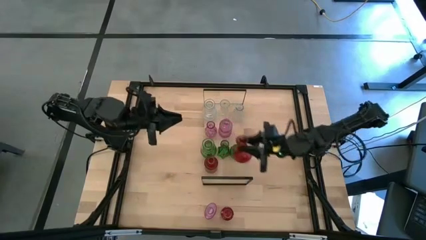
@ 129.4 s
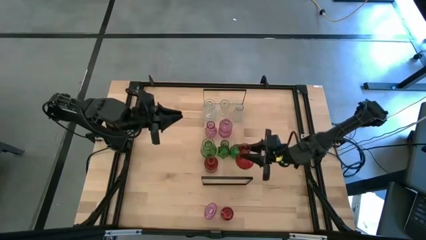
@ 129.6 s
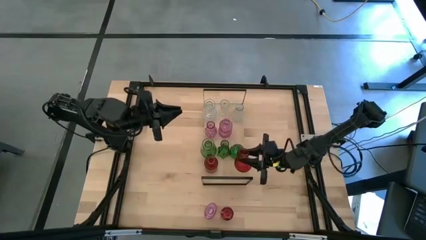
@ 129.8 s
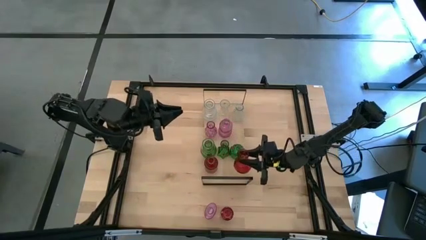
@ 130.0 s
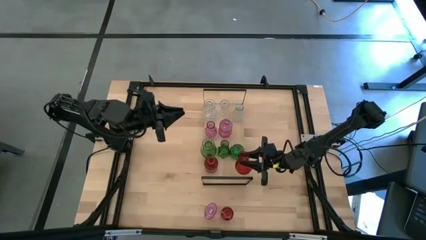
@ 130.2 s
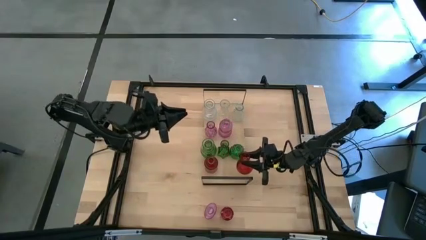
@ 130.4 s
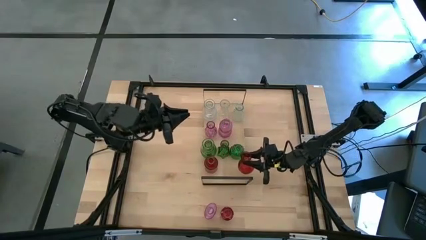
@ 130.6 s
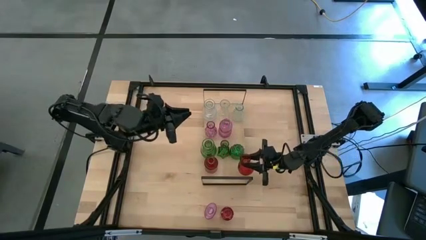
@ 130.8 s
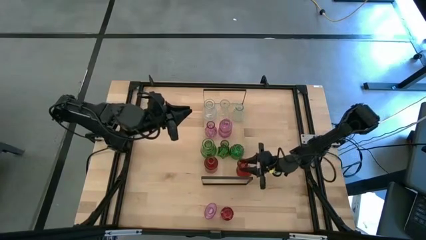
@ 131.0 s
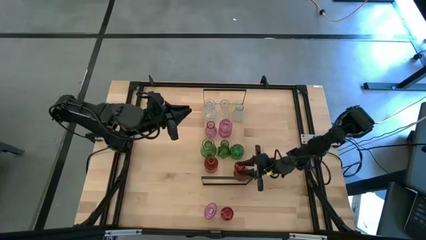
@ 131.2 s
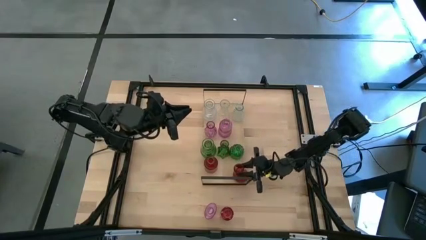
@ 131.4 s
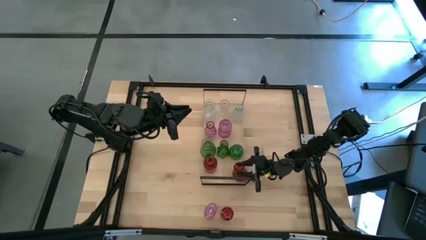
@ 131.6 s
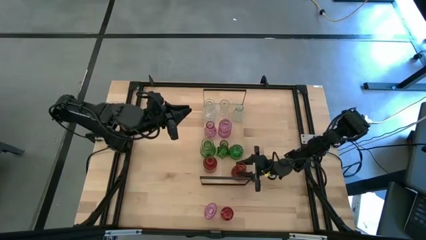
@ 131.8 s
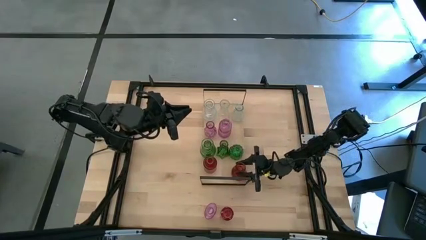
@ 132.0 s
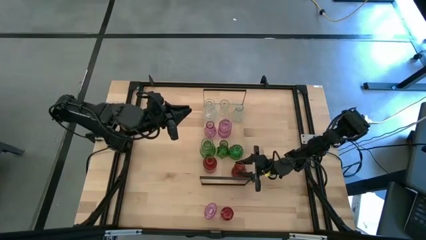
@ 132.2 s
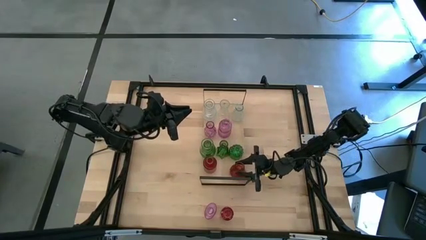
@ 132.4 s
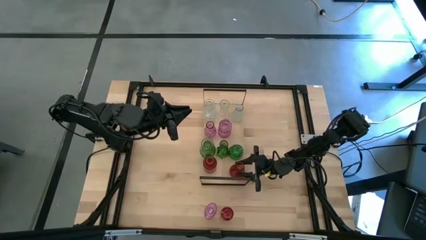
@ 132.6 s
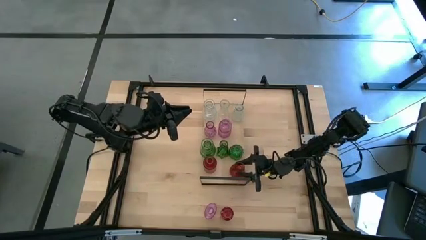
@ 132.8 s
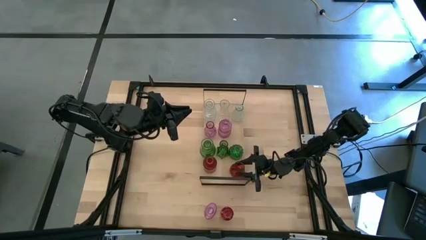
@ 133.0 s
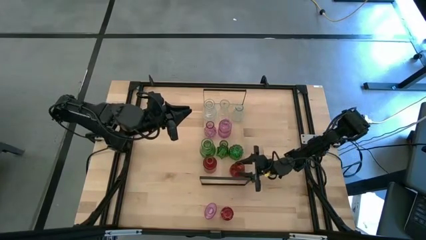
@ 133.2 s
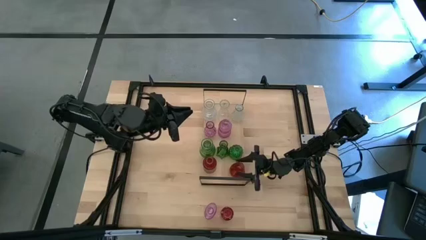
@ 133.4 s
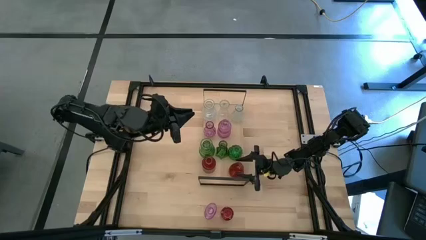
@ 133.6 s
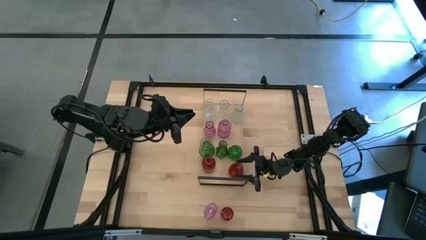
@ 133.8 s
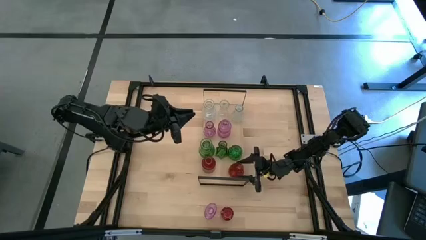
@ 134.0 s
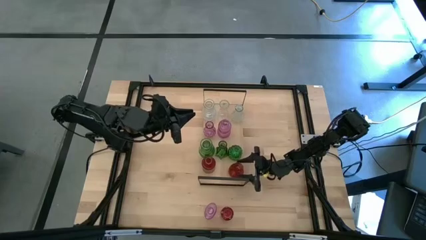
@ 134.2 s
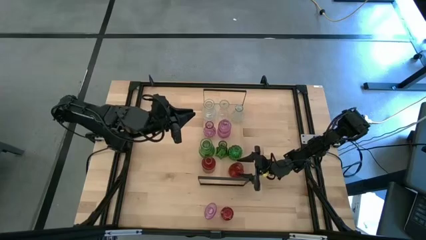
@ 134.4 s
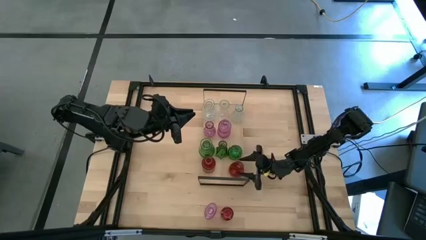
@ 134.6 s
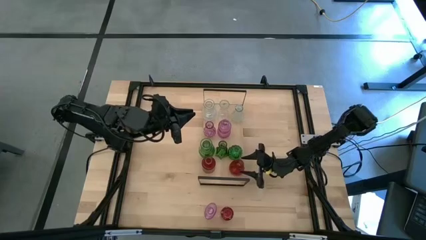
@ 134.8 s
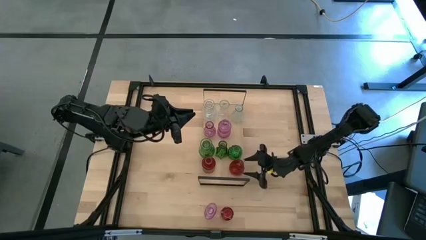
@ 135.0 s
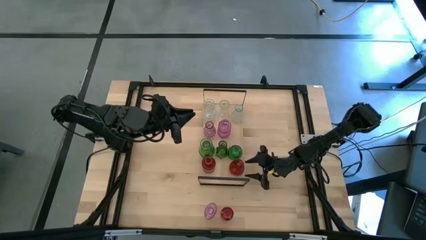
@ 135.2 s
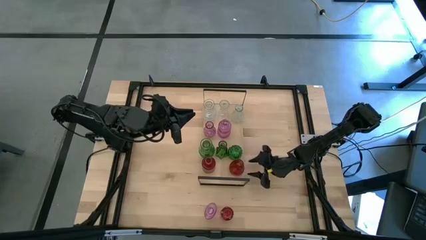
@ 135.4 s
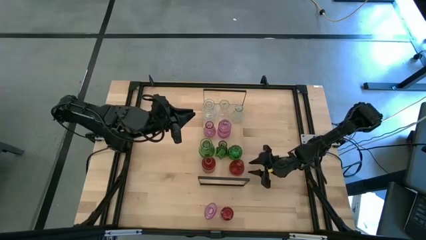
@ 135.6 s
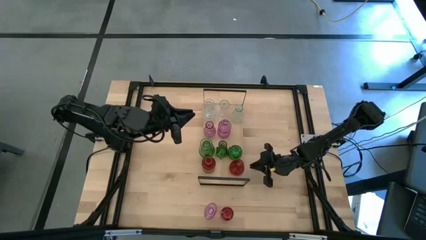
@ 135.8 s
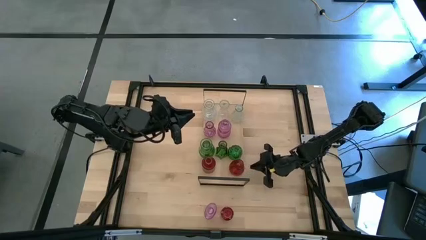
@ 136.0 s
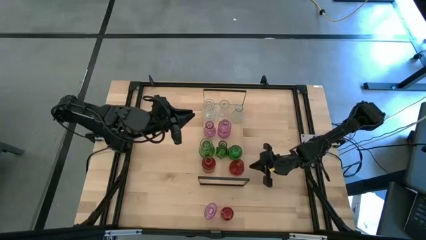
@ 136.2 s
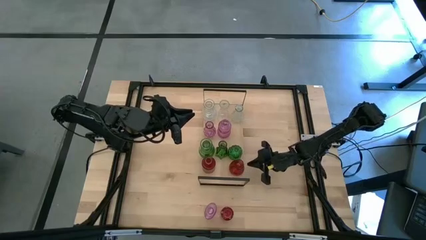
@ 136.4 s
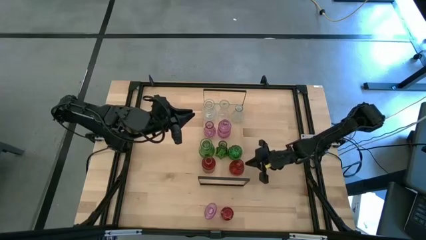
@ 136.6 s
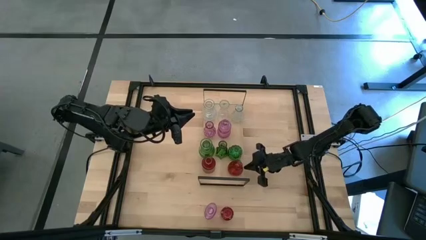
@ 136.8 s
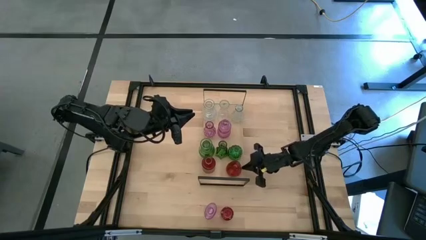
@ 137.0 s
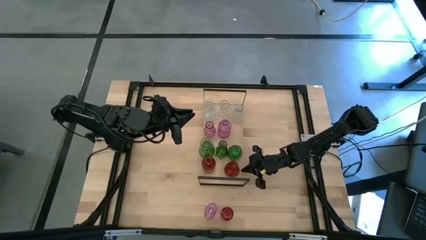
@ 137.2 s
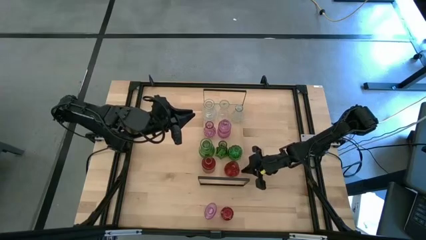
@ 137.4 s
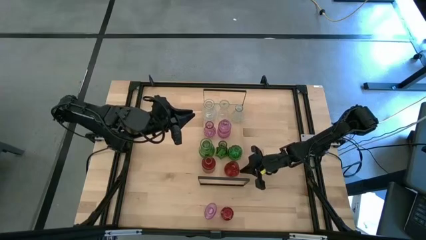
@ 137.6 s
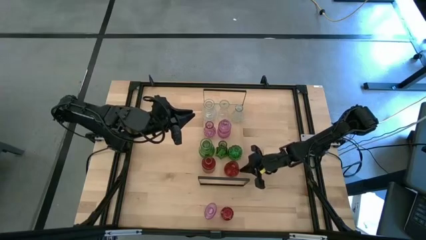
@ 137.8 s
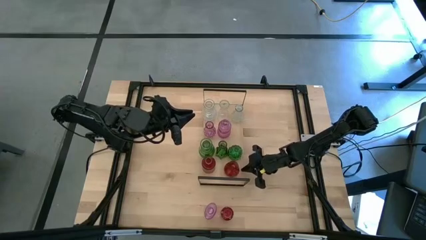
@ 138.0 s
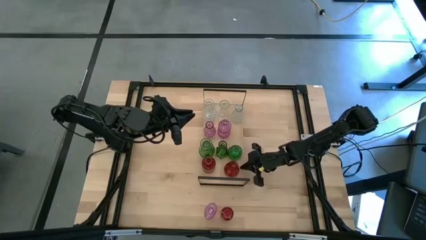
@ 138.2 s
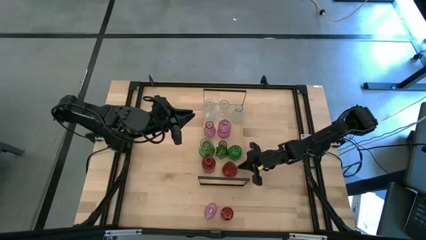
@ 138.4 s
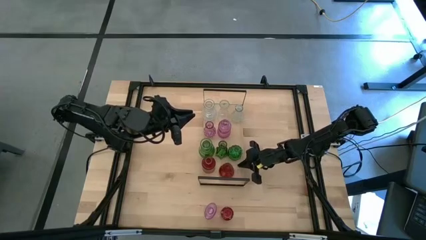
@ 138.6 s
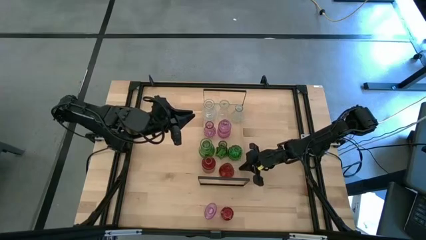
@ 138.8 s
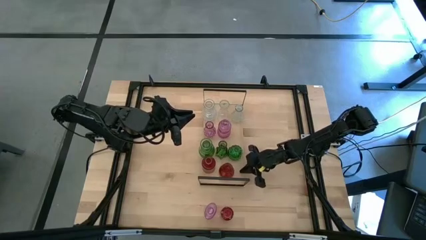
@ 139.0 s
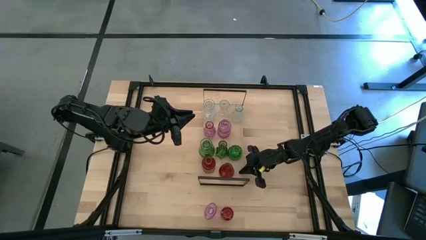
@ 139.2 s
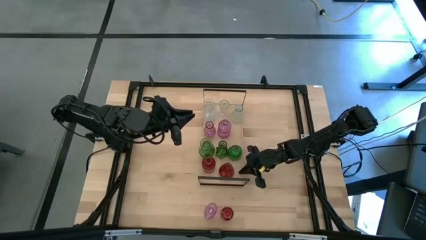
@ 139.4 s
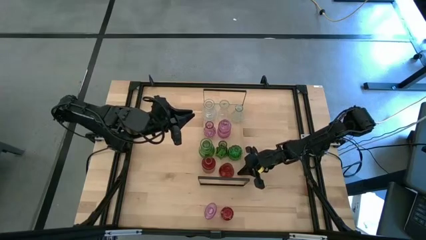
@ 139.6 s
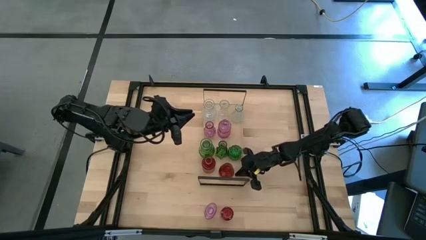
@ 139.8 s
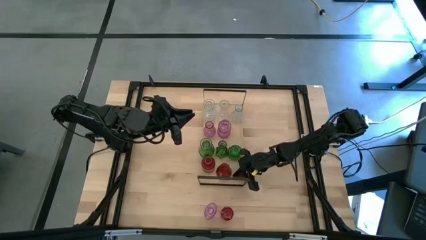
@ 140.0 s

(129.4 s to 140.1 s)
Task: sort vases onto shelf
Put the left red vase on the shelf aligned with the other red vase

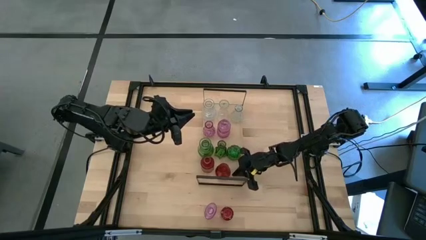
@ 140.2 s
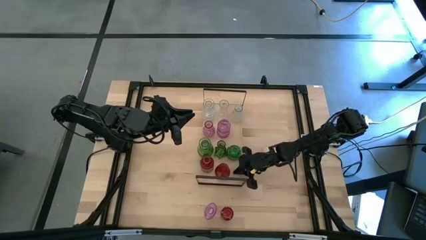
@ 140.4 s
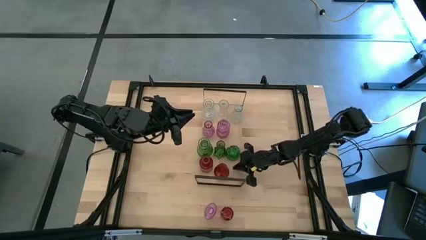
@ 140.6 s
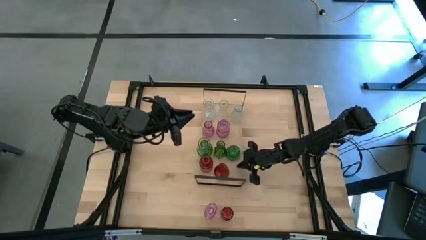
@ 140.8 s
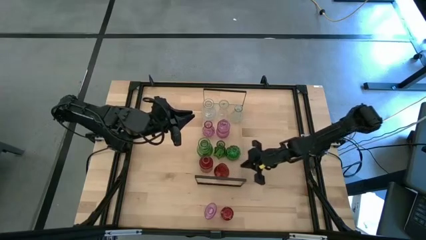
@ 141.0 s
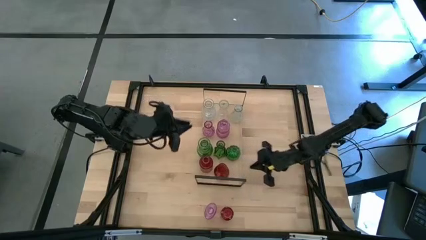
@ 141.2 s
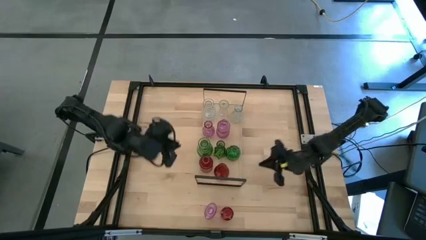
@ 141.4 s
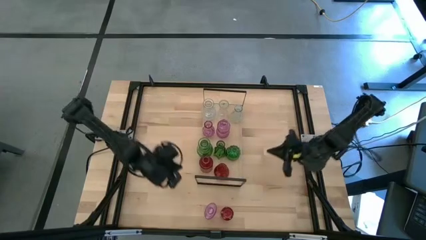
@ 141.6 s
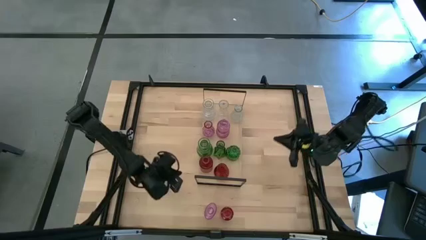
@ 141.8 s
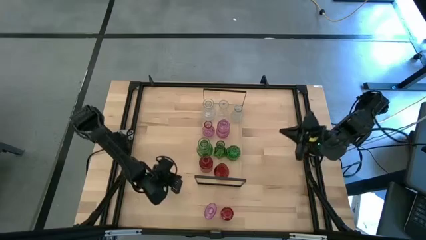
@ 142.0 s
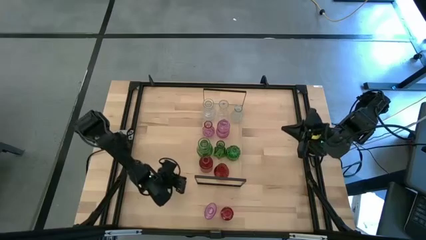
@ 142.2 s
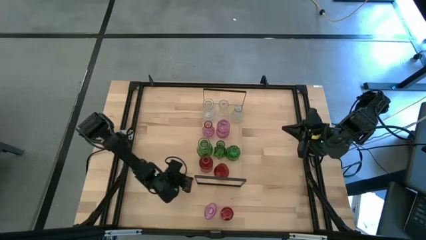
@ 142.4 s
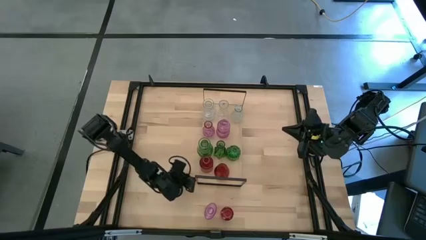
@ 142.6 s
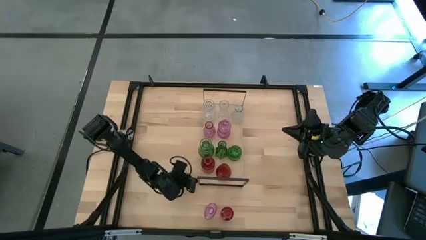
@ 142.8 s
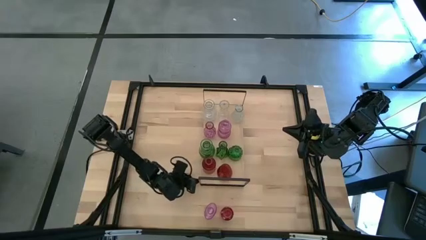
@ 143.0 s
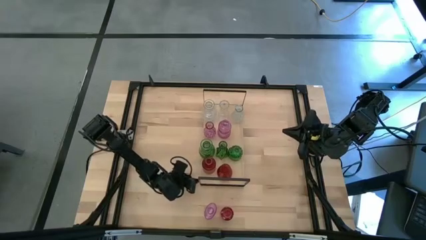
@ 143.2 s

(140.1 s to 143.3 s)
Adjust the shelf
